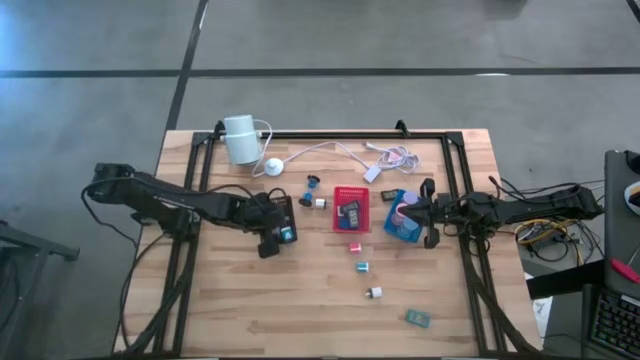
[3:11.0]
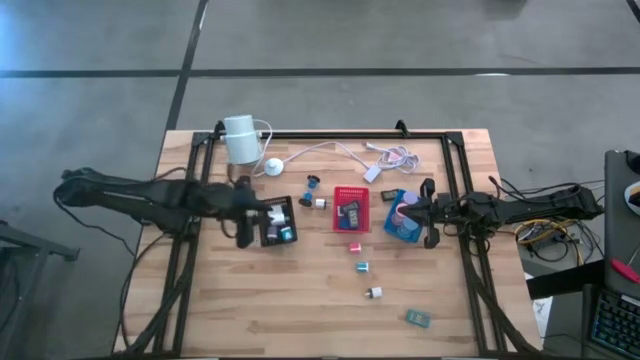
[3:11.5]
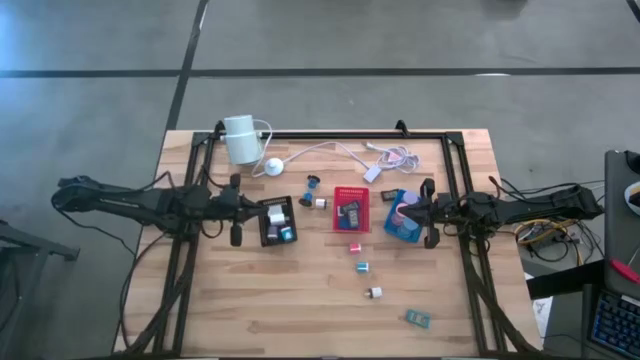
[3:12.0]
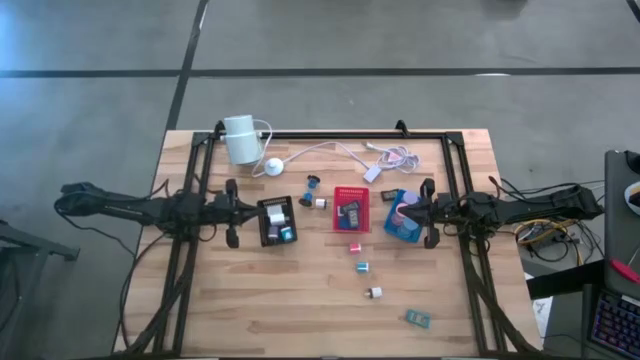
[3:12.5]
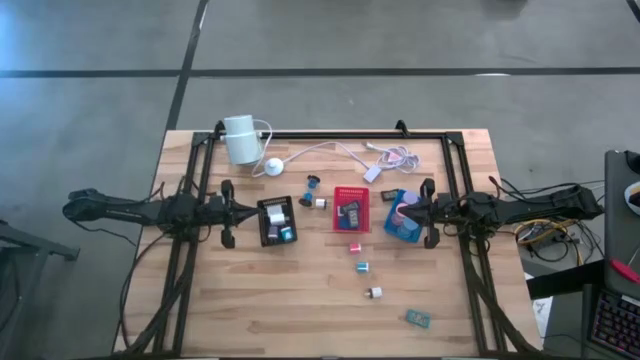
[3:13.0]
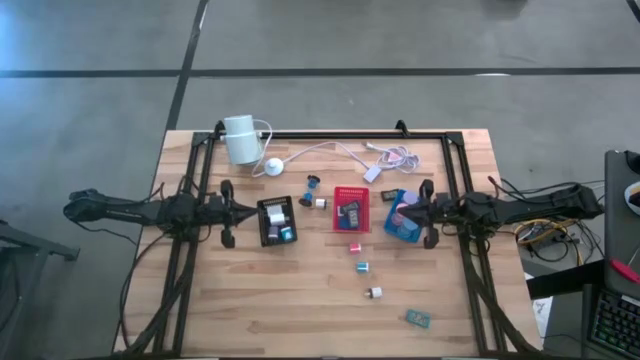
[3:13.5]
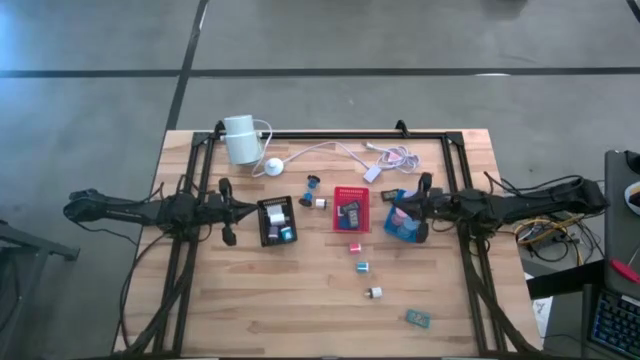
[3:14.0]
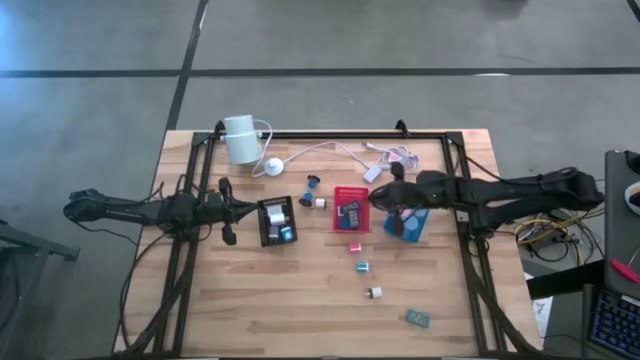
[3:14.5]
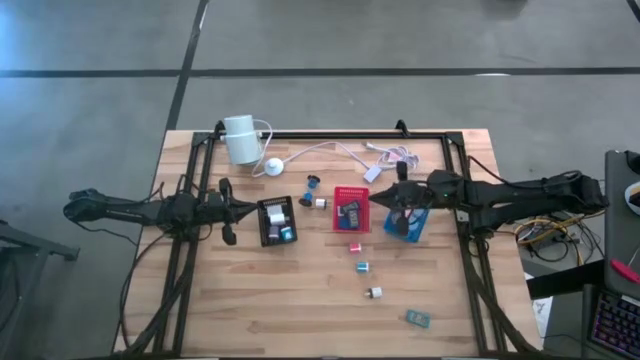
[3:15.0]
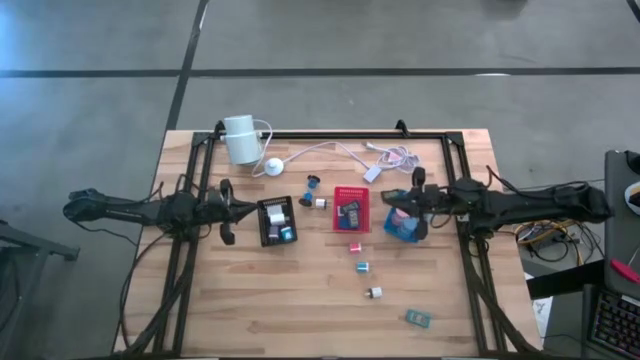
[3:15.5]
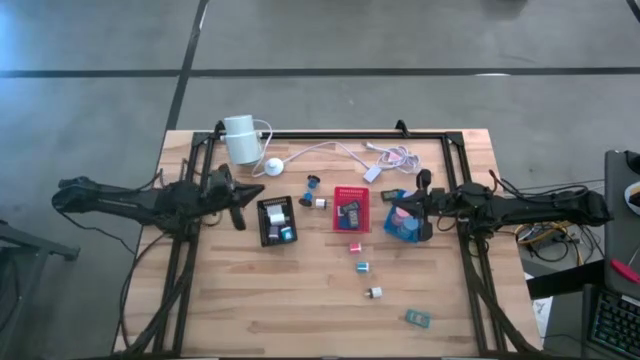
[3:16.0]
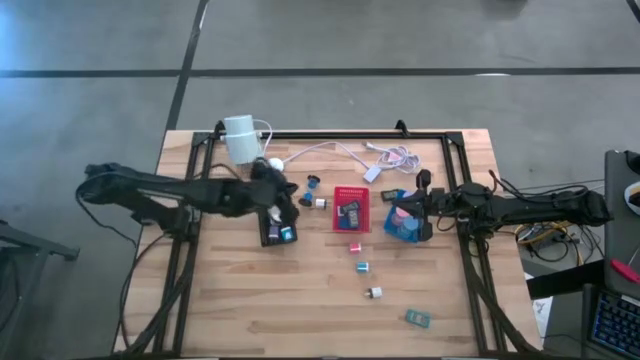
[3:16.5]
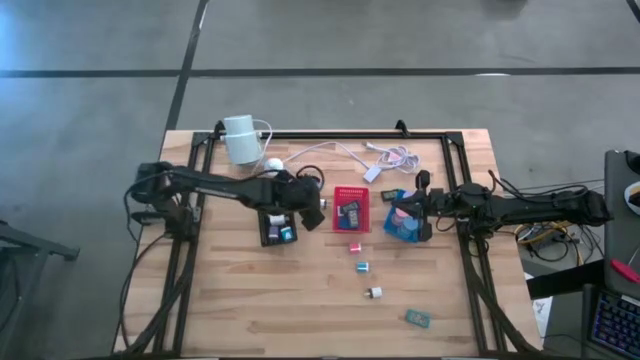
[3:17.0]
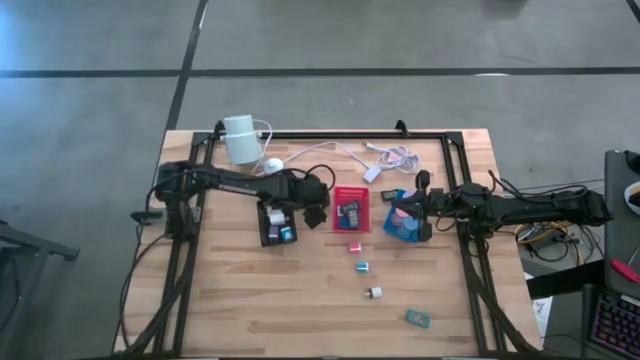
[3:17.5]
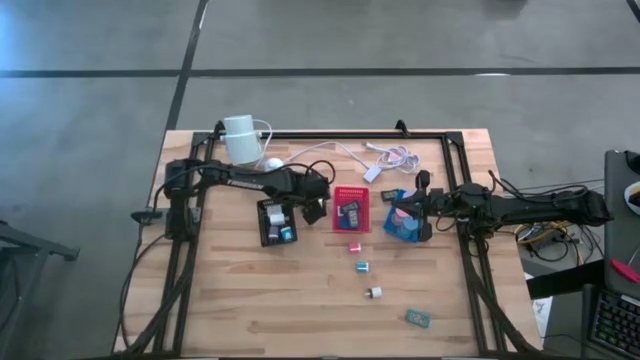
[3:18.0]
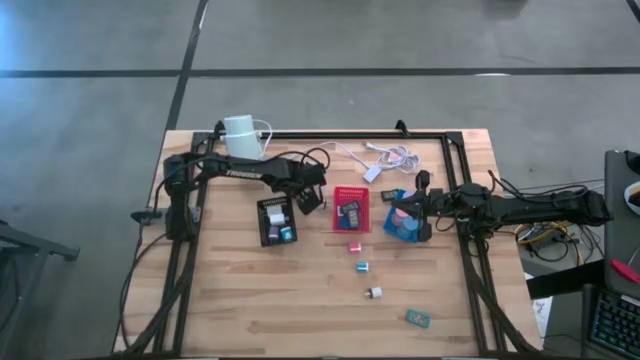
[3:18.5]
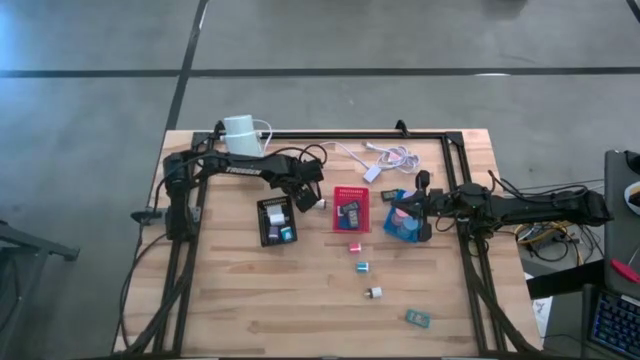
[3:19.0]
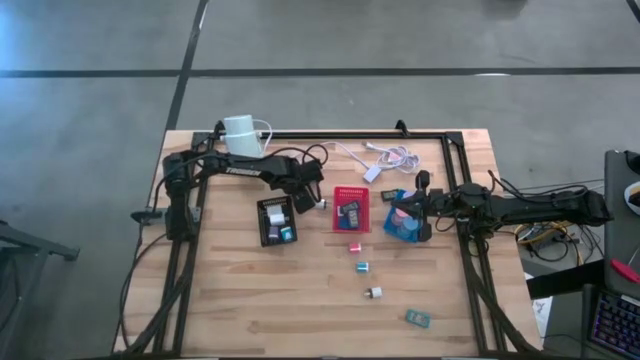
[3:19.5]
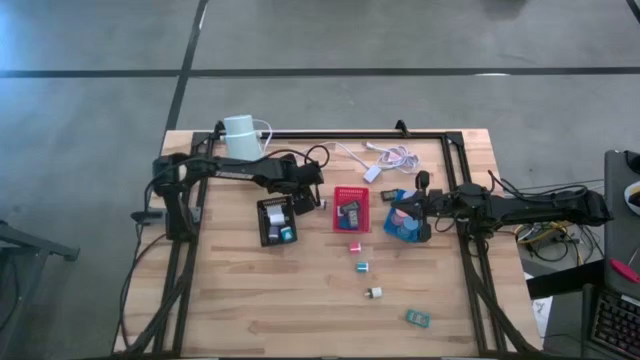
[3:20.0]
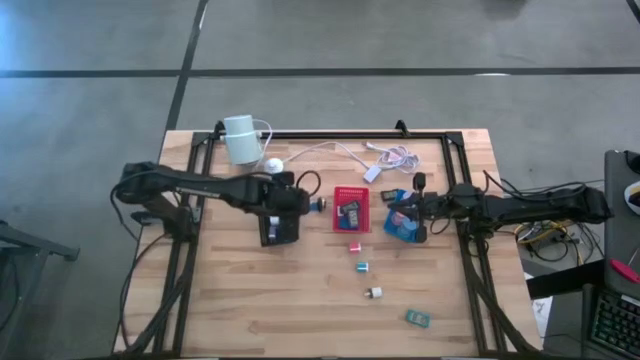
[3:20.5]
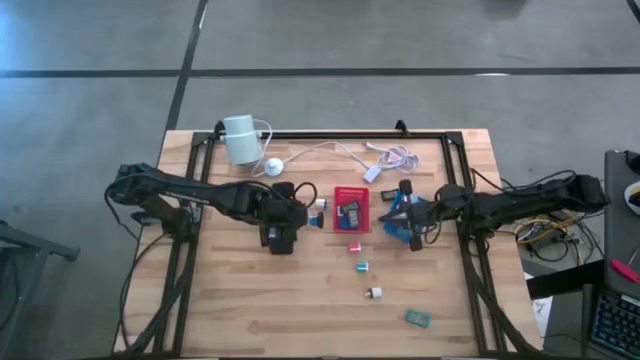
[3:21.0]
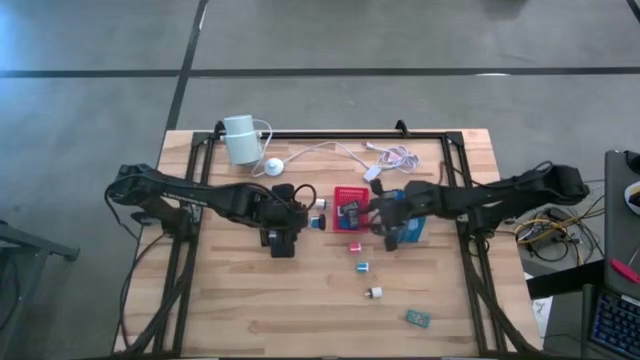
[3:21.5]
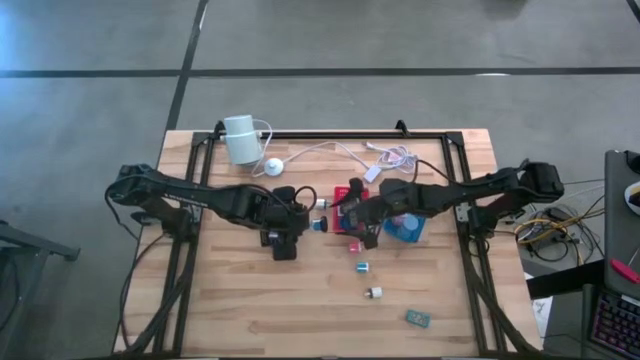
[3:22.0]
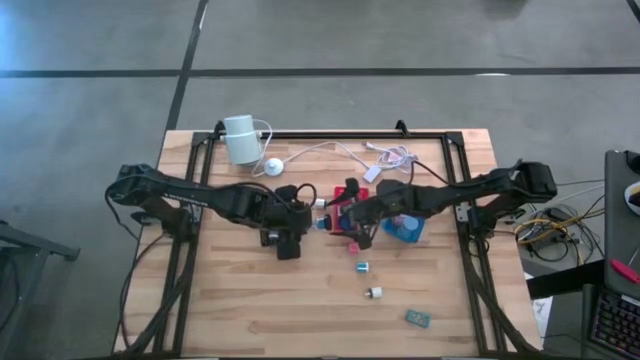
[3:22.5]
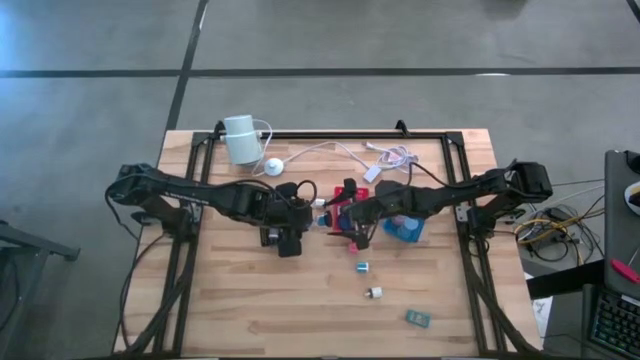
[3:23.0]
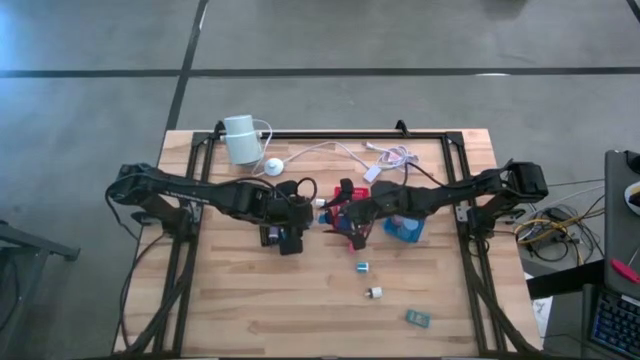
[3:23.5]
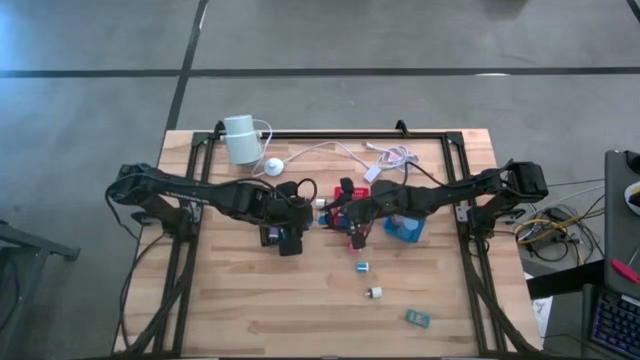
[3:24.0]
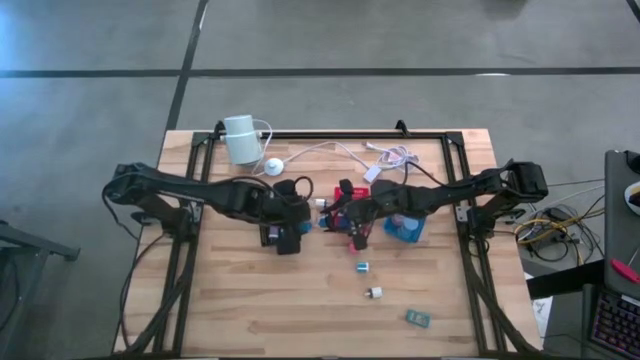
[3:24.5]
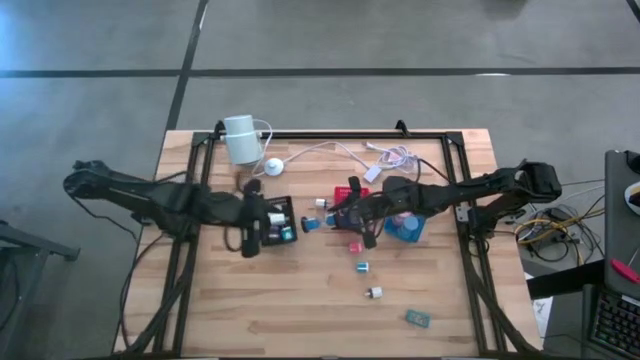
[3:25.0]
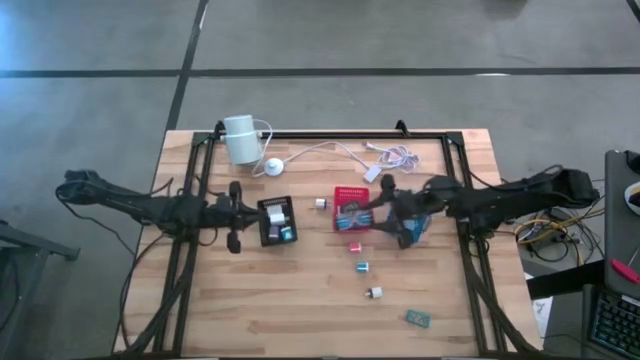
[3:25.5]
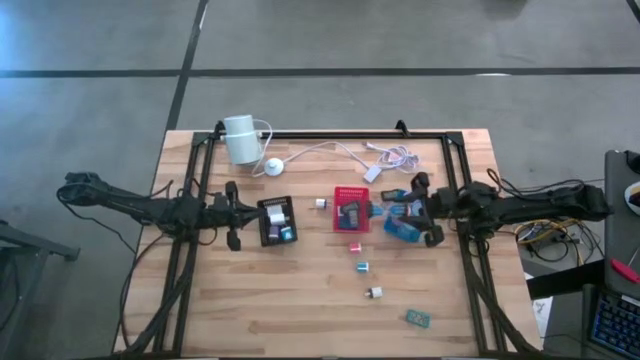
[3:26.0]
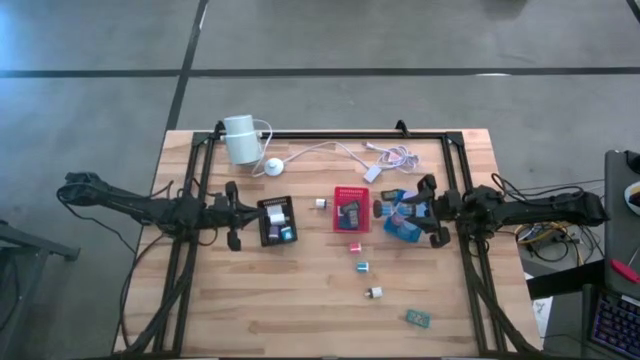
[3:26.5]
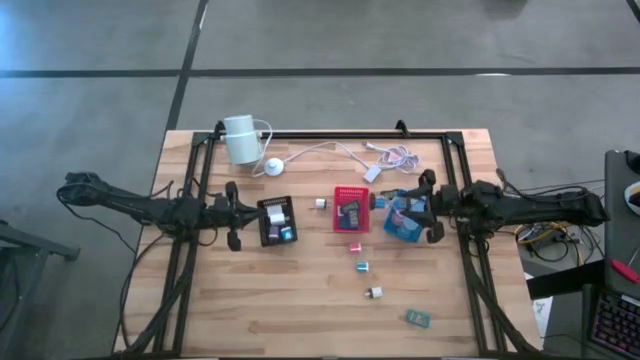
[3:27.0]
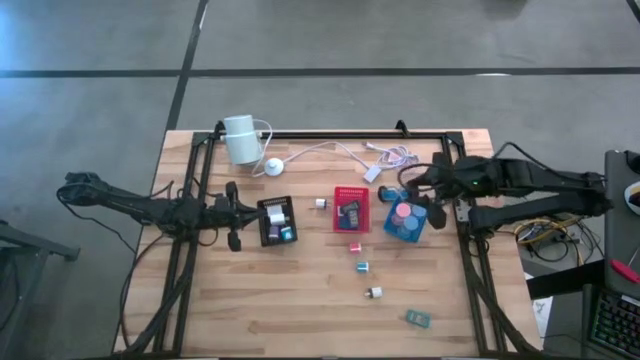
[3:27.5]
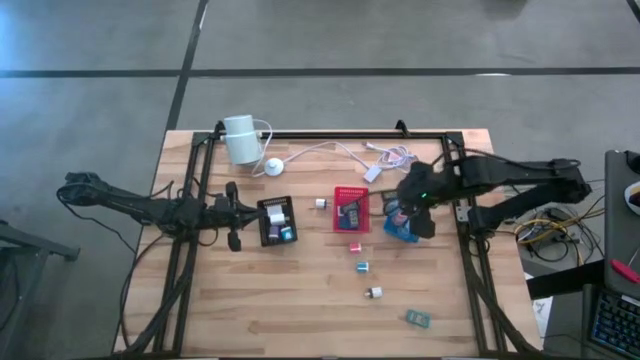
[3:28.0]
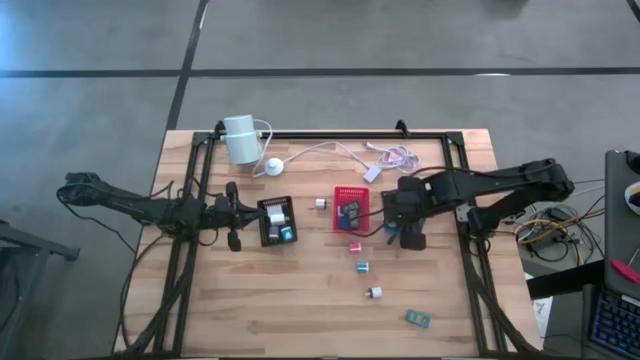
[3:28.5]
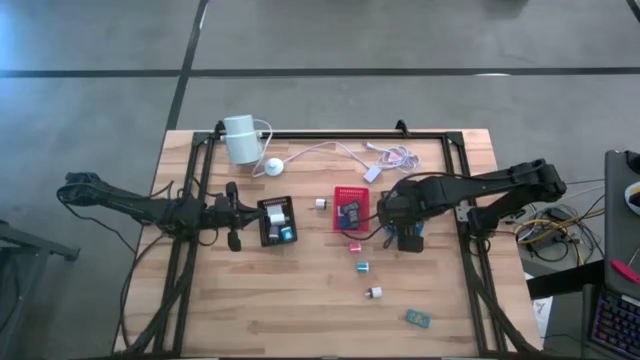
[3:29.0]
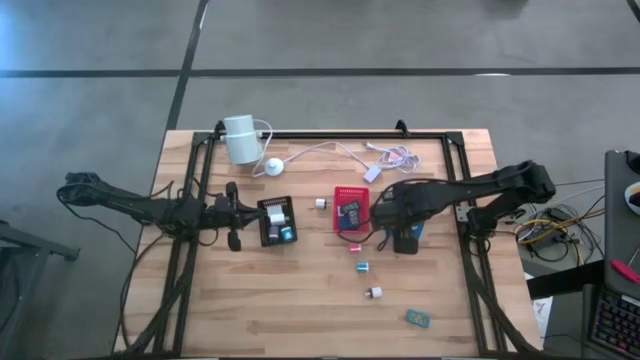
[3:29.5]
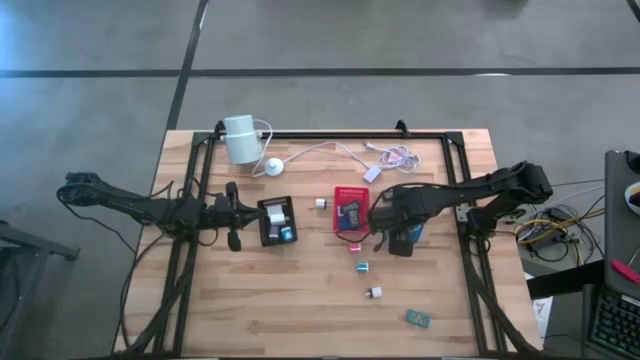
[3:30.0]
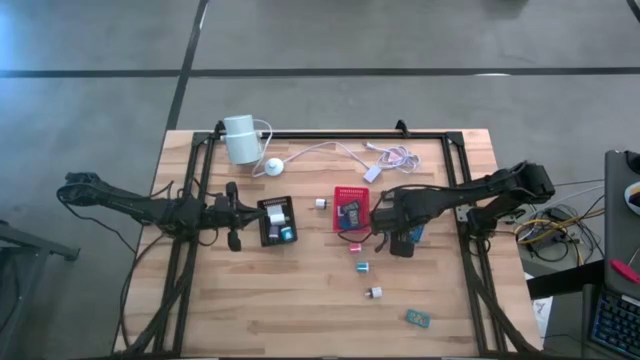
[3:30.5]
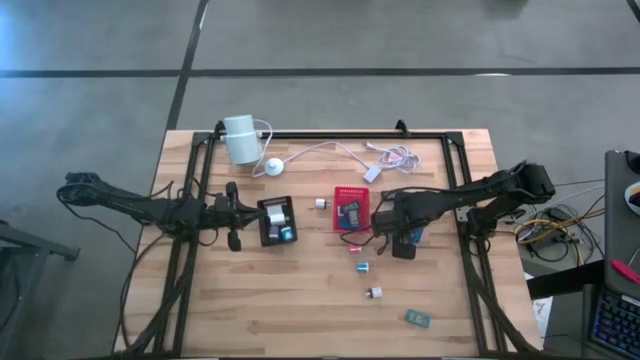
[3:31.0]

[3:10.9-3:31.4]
Task: Pick & Place Office items
Put the blue hourglass into the blue bin

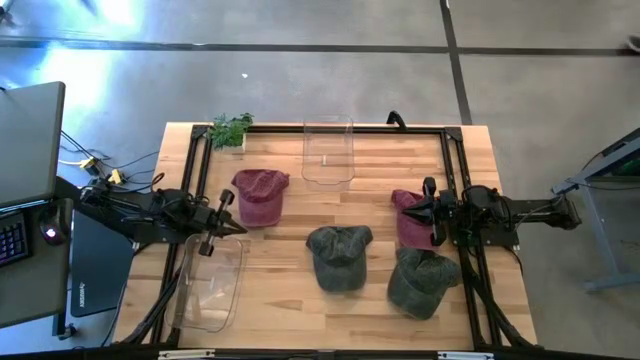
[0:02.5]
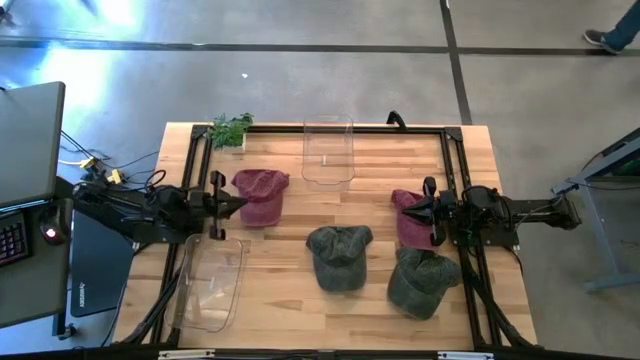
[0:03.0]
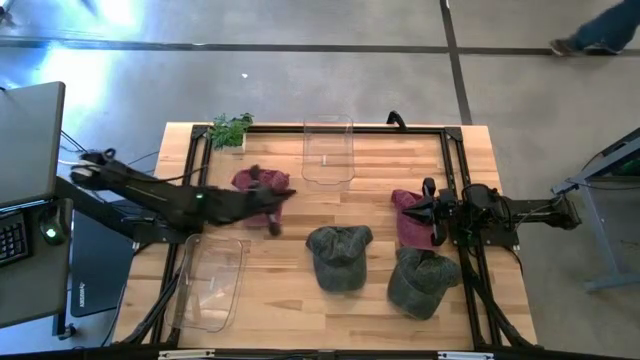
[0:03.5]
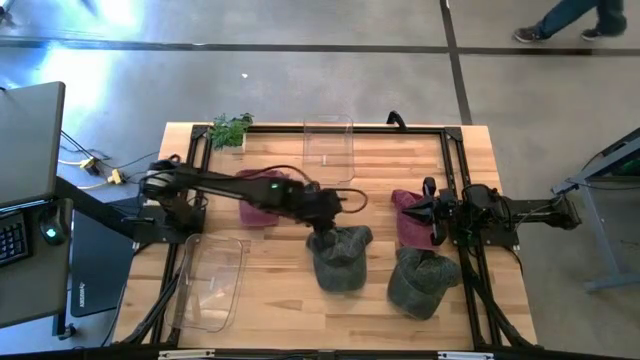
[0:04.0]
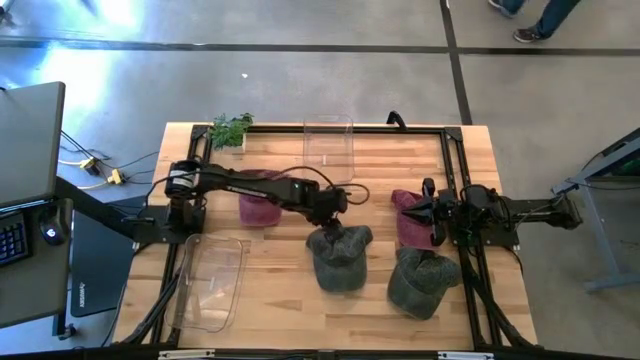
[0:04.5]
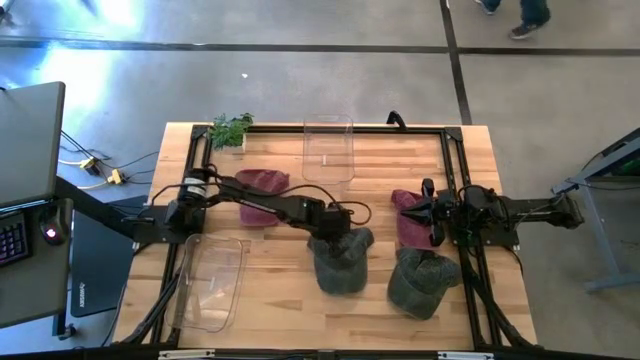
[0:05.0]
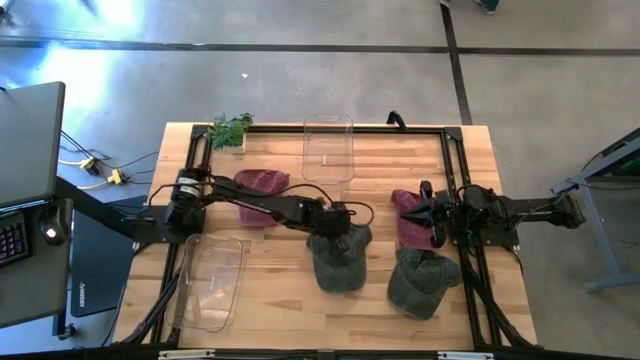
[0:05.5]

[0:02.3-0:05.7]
Task: Pick & Place hat
Put the left black cap into the top transparent bin
